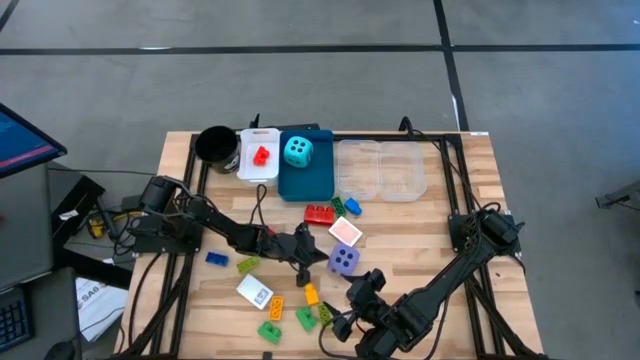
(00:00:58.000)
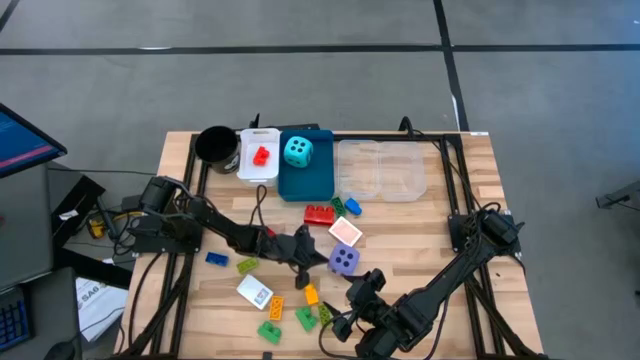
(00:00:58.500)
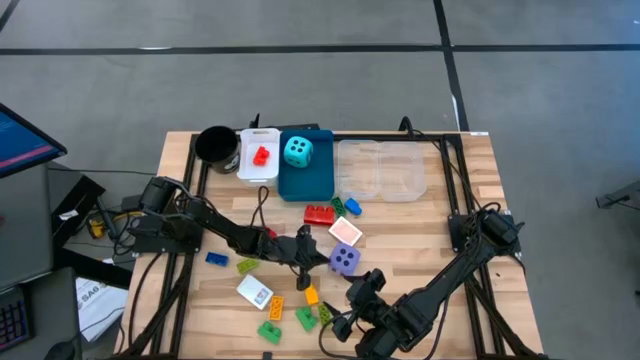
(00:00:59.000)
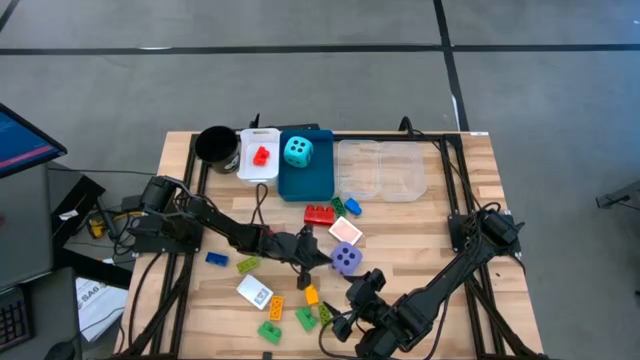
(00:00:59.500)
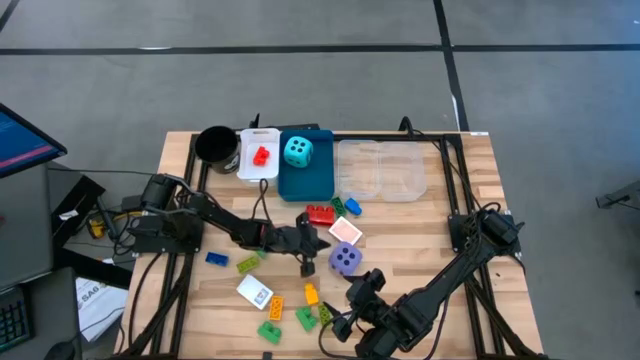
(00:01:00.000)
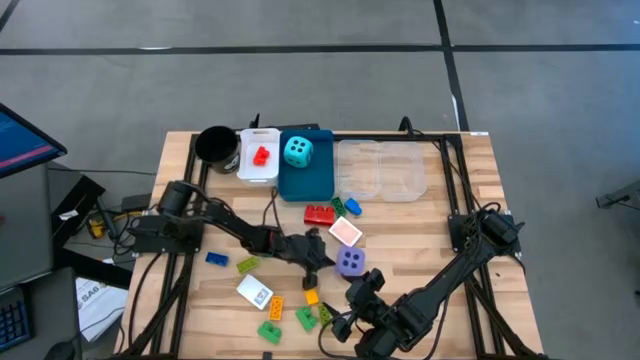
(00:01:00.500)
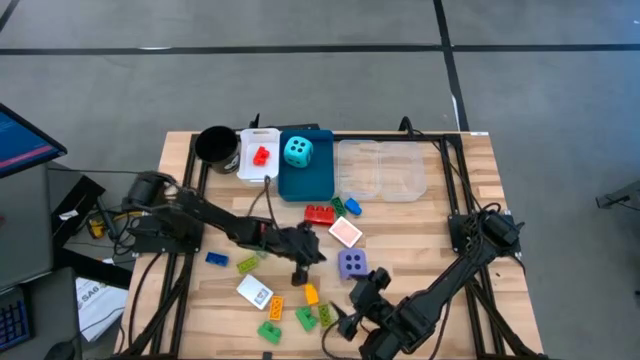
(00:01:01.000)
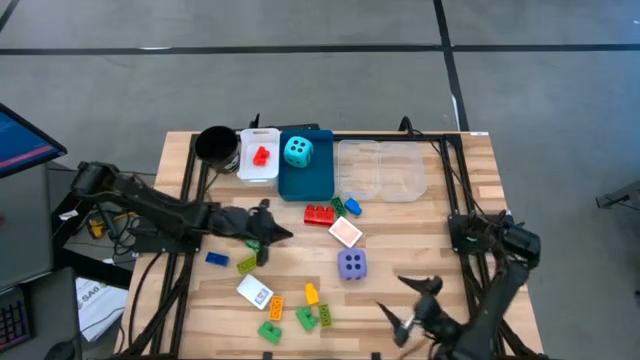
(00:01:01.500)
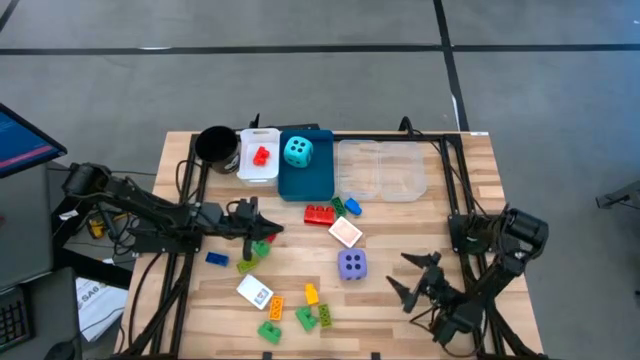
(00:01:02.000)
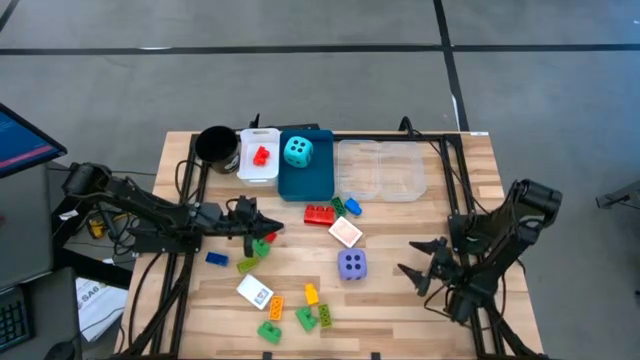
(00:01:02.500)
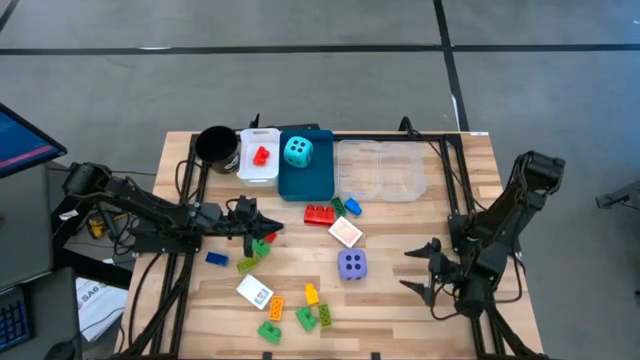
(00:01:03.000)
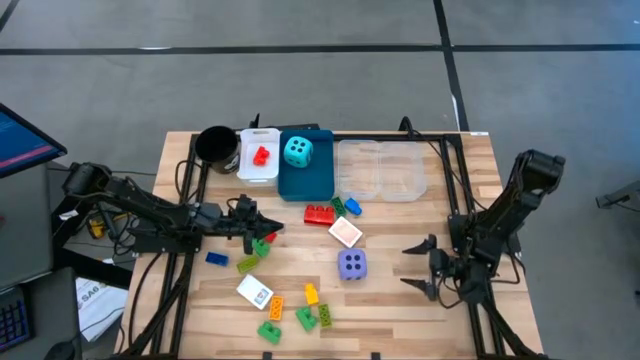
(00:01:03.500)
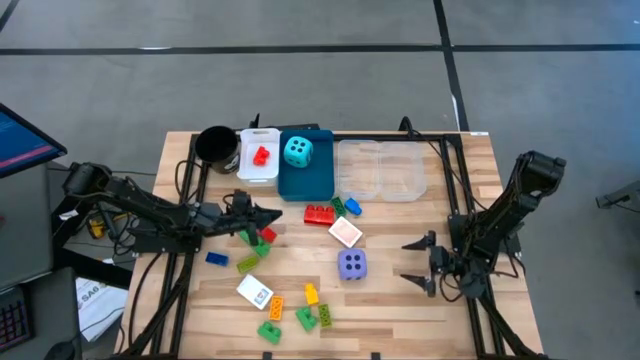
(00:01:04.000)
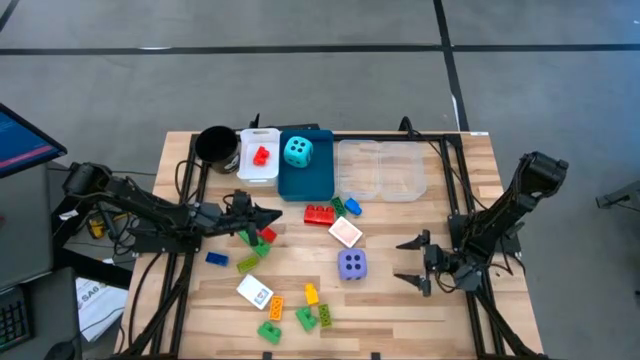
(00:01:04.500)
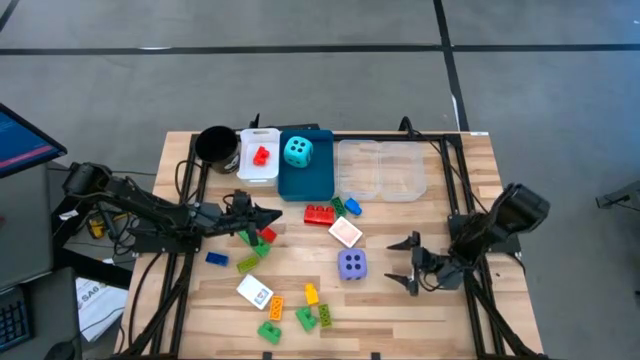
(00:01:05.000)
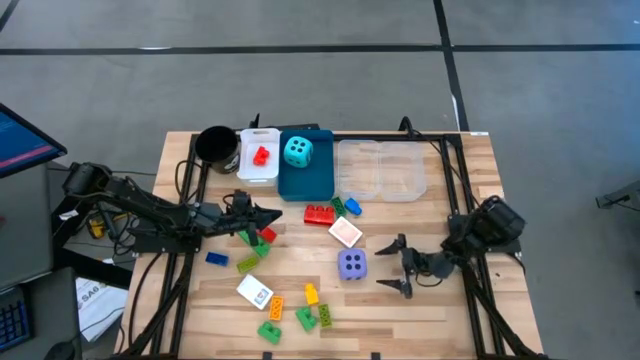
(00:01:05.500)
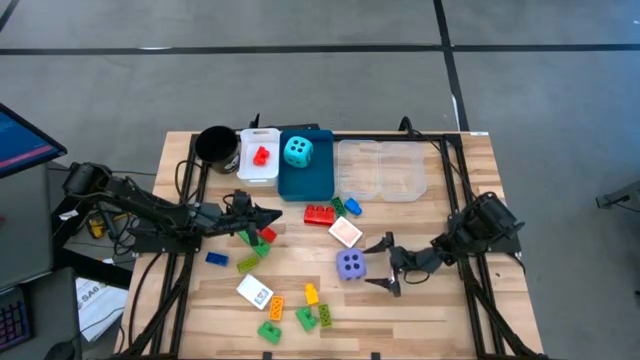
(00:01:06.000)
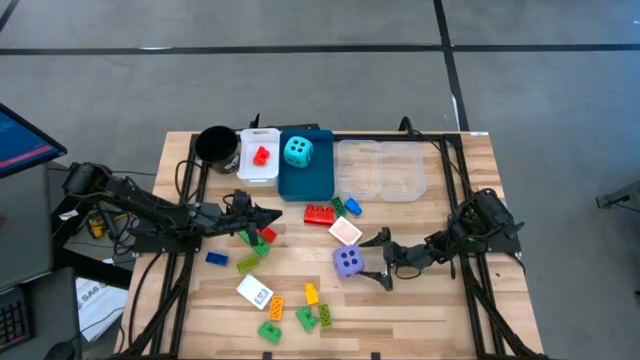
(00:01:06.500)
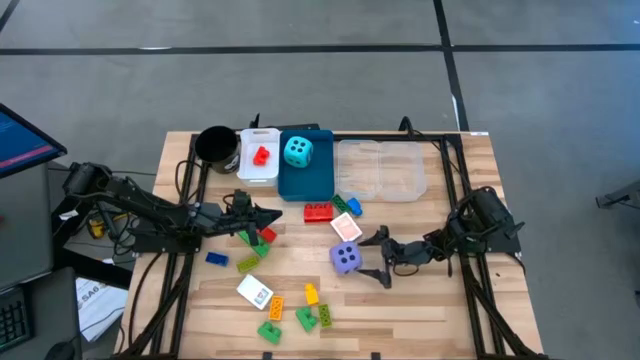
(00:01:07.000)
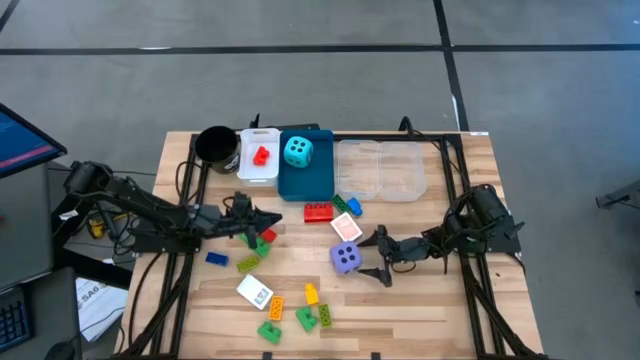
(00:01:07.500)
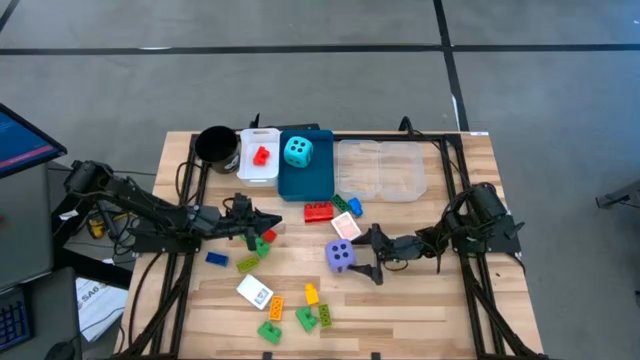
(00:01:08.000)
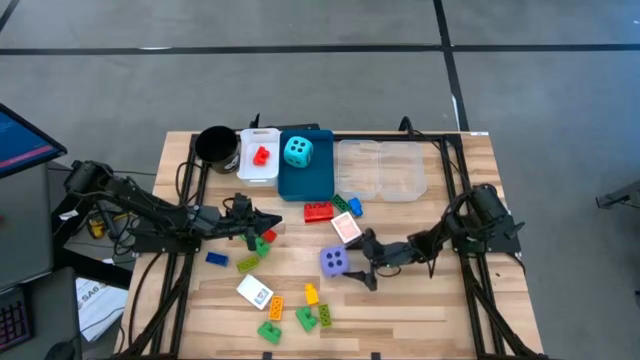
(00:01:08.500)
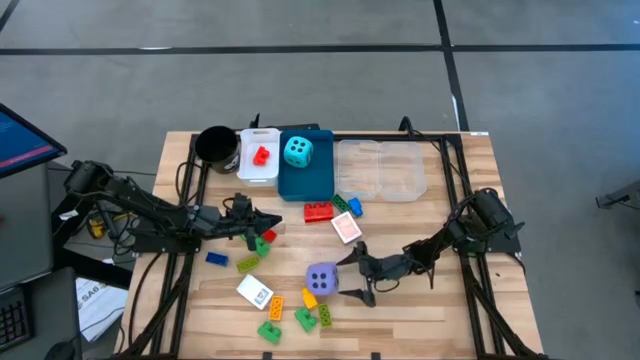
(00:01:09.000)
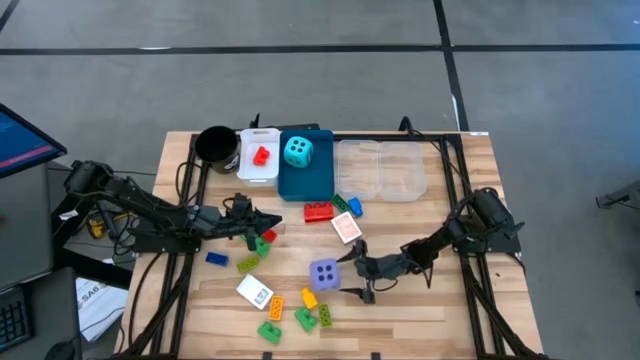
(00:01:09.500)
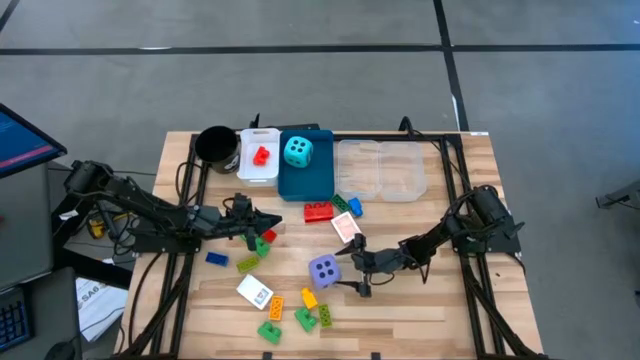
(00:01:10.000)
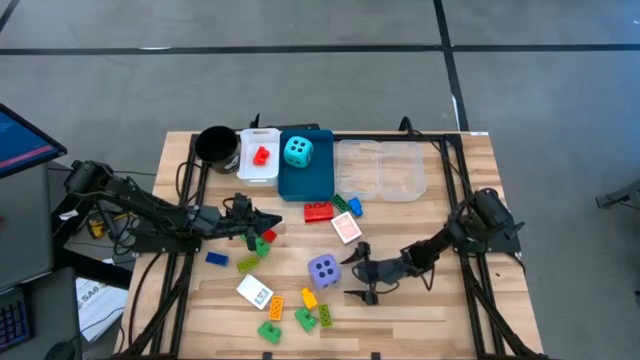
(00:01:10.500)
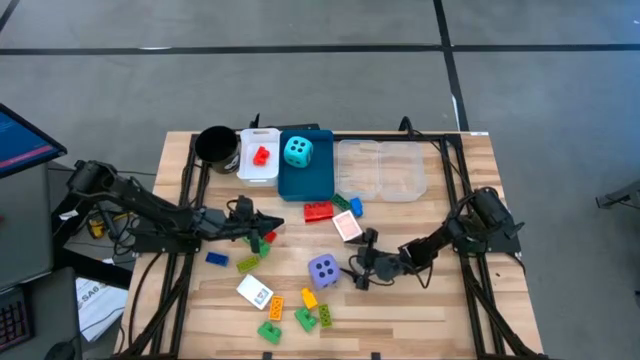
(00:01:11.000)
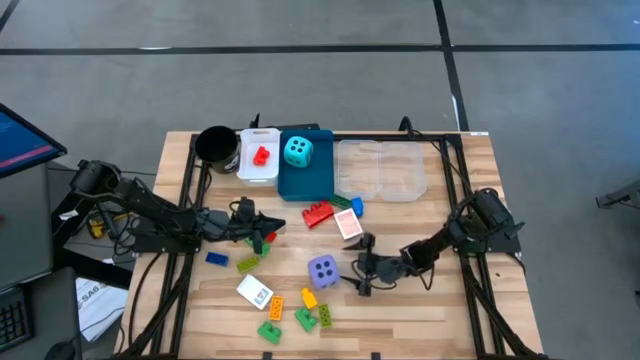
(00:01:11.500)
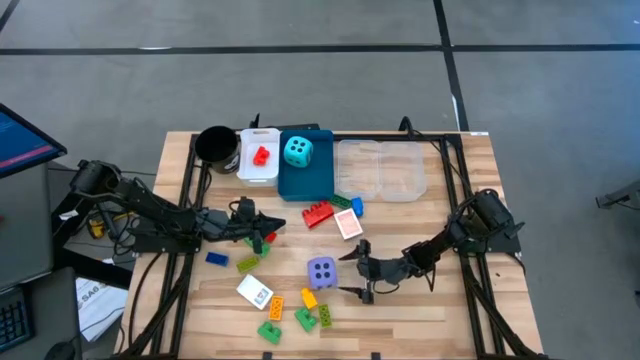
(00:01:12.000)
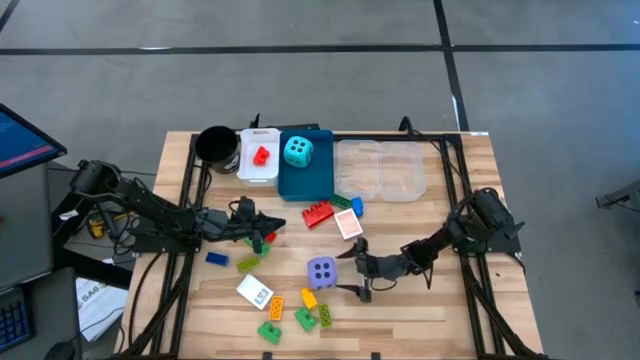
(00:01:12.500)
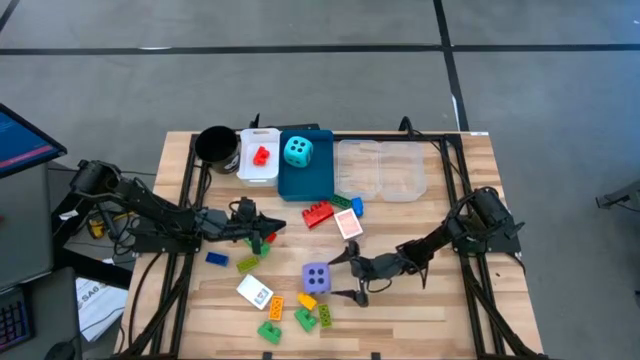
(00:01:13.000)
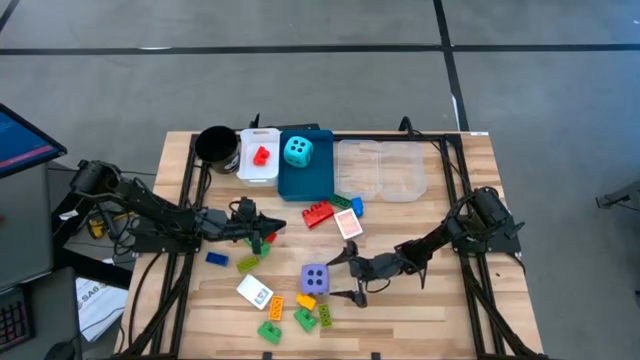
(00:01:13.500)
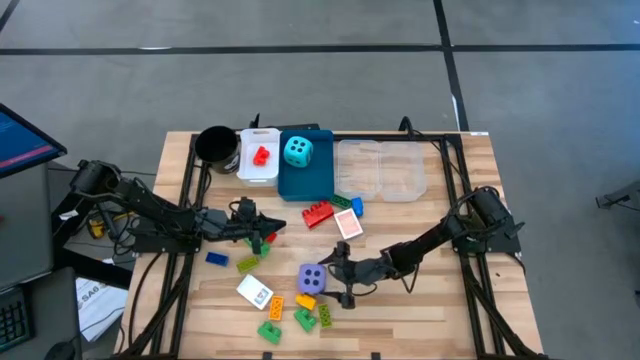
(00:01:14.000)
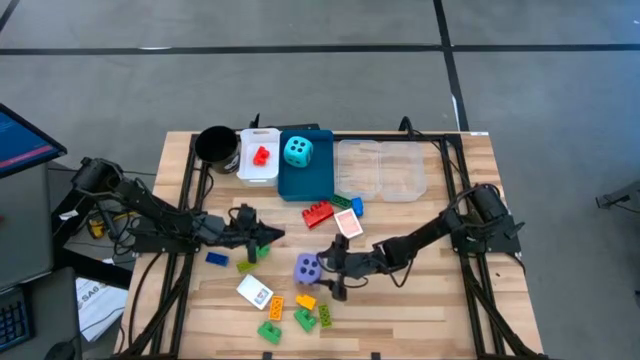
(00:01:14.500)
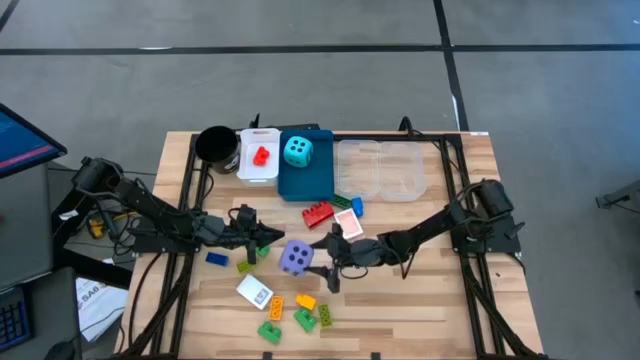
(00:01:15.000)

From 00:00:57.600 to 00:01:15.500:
Task: Pick & Place Toys
Put the violet dice into the blue bin

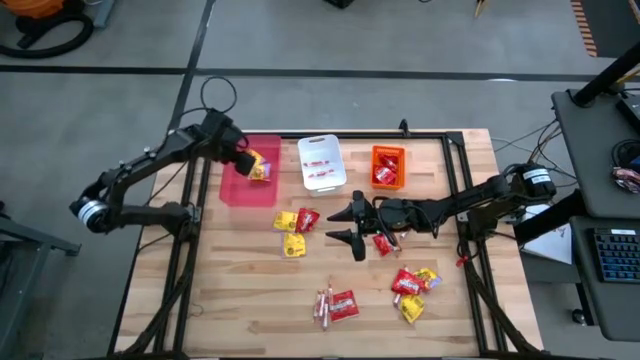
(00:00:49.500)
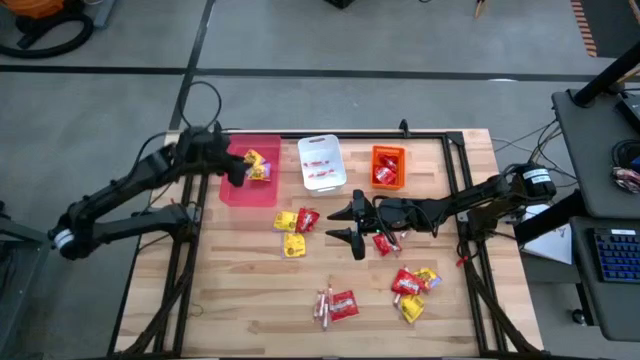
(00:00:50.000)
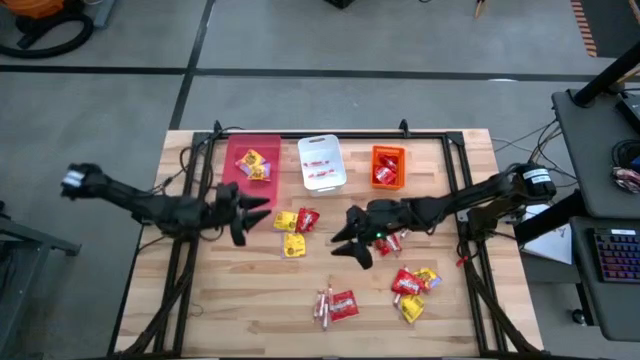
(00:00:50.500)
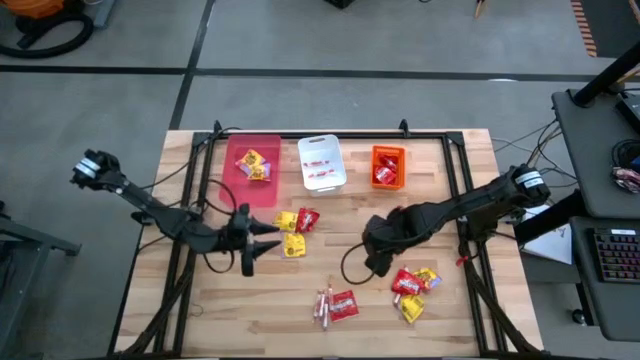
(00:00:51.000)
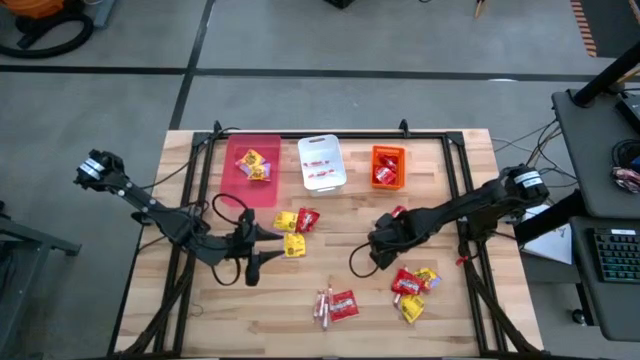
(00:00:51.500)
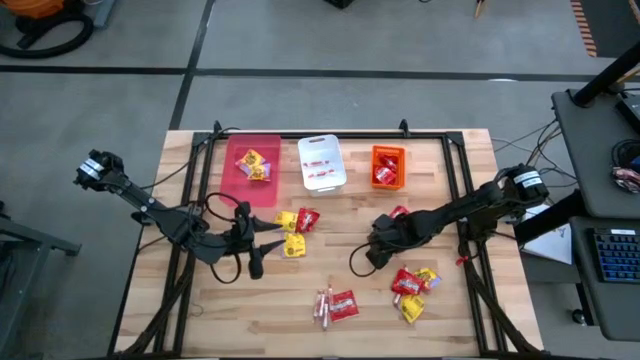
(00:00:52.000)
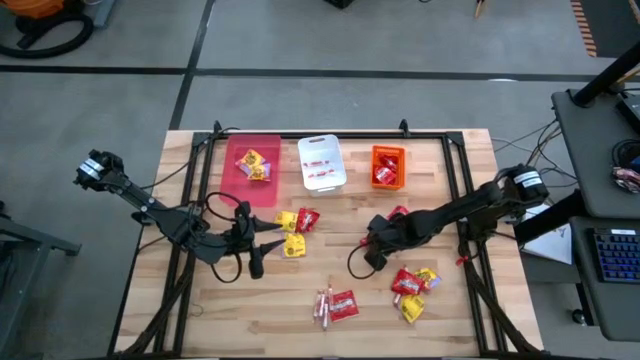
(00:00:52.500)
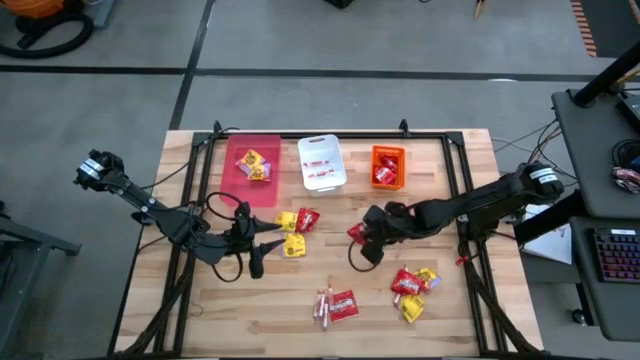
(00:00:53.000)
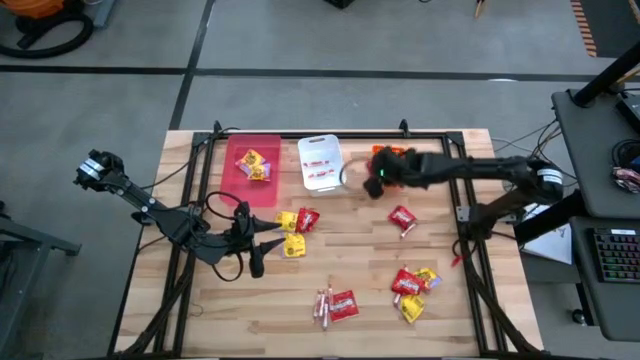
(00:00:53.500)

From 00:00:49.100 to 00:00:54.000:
Task: Sort candy
Put the red candy into the orange bin
